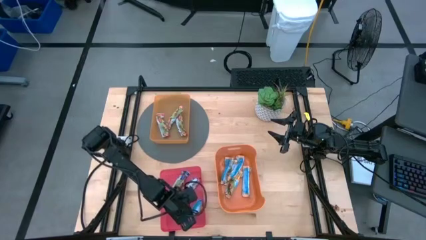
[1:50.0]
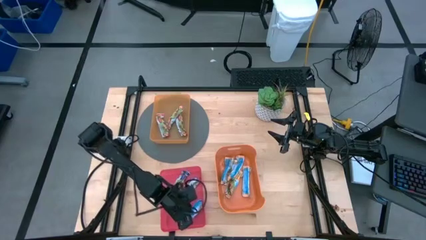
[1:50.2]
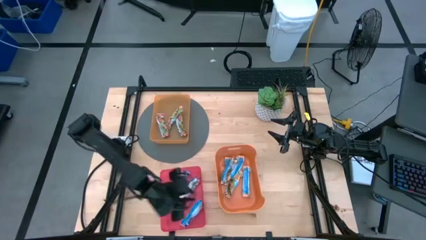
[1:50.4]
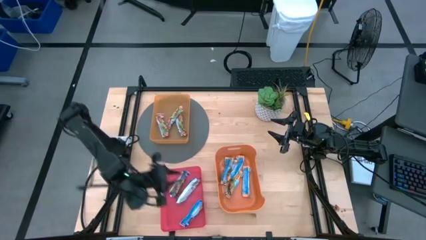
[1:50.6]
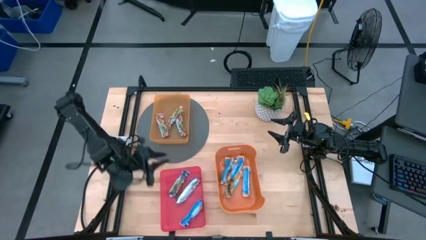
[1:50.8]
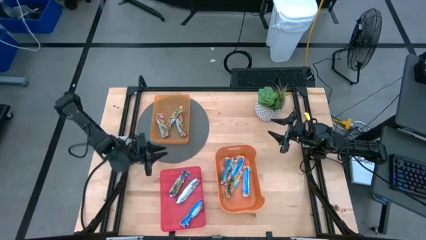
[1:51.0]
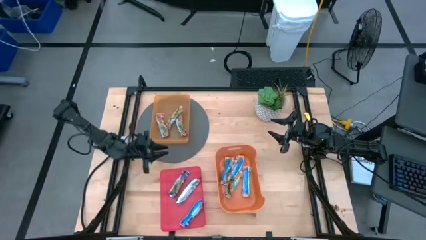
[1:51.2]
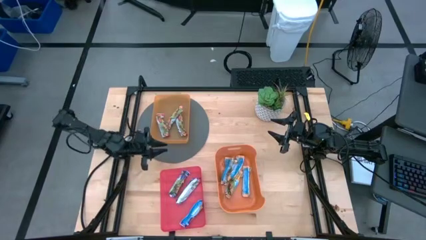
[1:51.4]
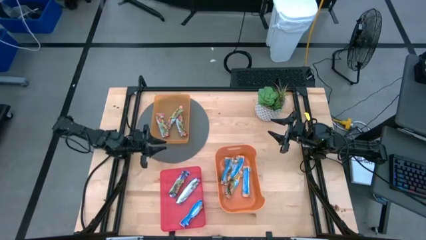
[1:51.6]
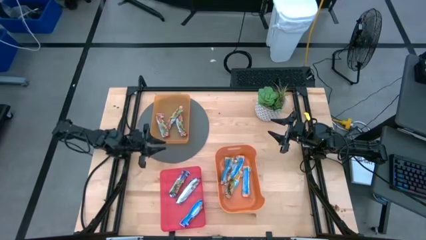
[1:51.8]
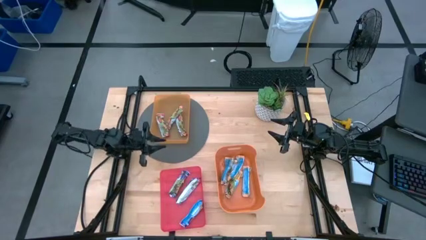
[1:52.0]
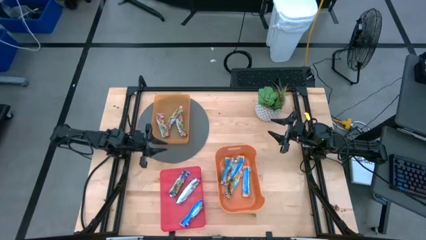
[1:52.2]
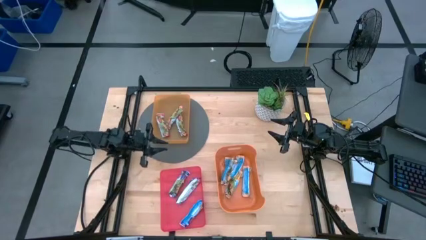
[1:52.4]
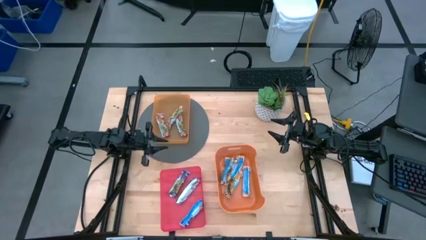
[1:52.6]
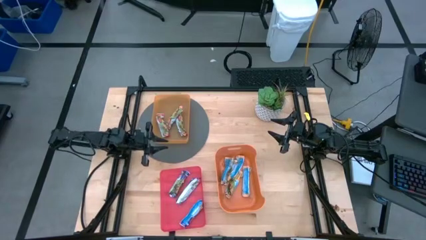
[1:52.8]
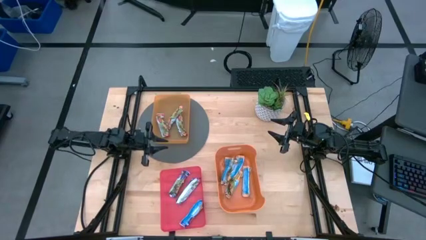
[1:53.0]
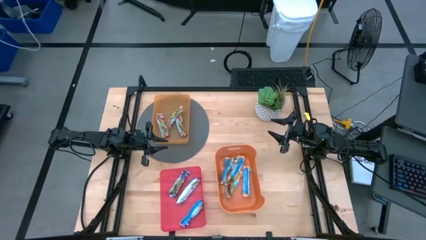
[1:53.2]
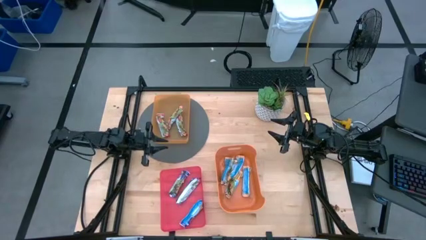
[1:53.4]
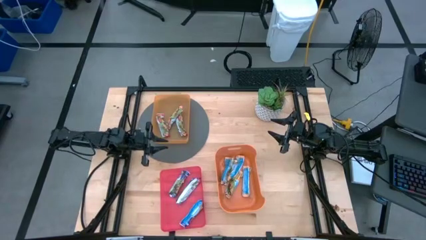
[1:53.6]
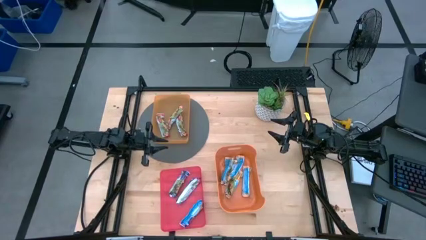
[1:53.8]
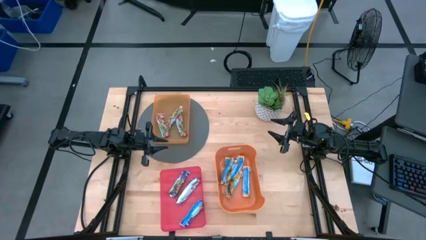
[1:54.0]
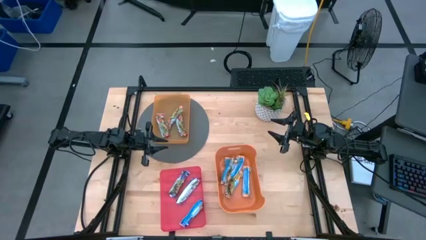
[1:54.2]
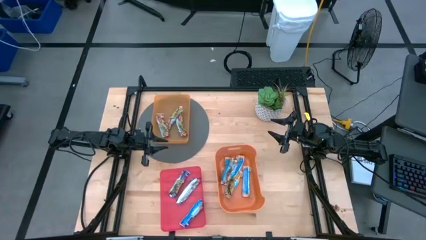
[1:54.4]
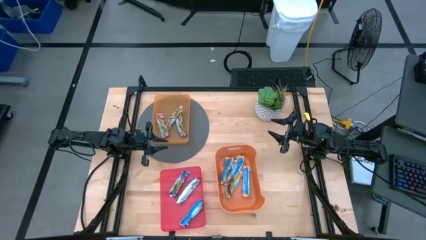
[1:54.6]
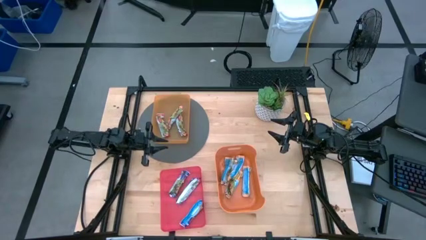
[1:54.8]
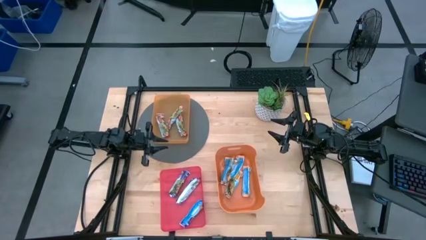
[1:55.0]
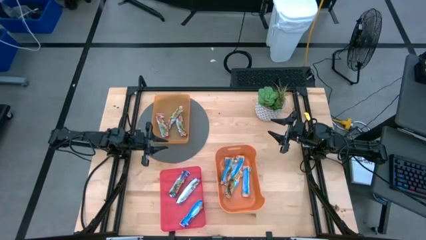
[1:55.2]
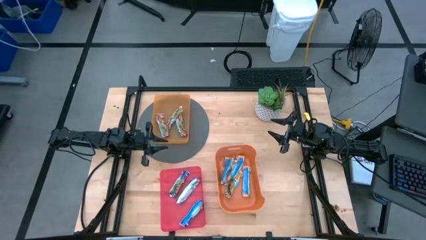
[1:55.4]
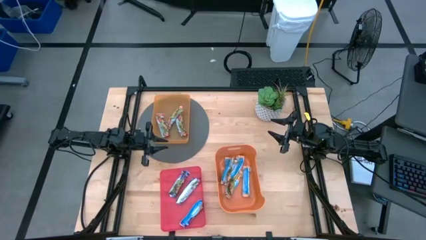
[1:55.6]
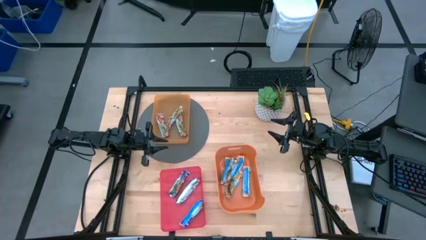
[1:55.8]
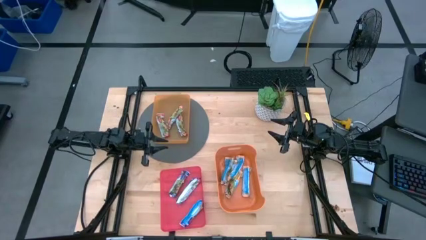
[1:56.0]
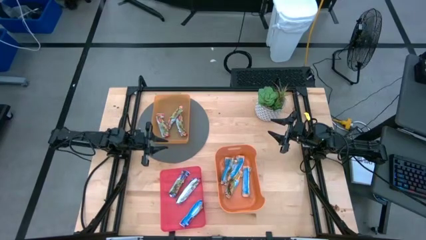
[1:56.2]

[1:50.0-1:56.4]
Task: Pick and place Granola Bars by type
Return to Home Position

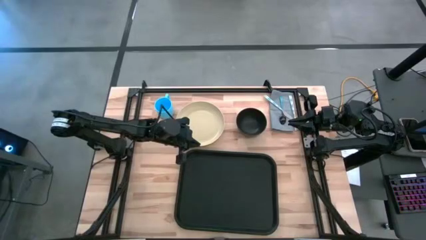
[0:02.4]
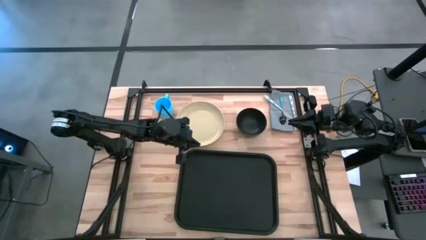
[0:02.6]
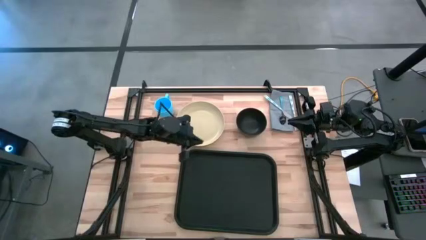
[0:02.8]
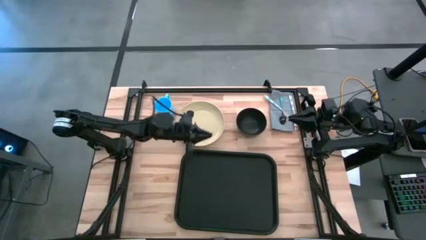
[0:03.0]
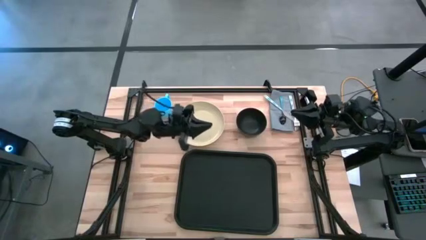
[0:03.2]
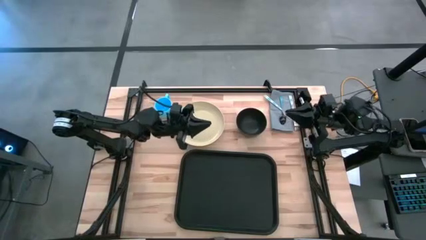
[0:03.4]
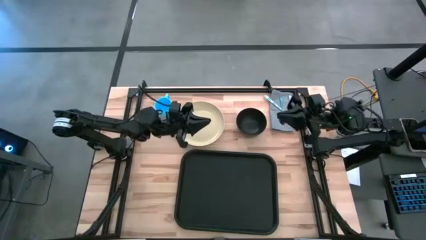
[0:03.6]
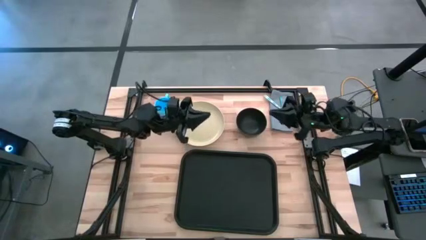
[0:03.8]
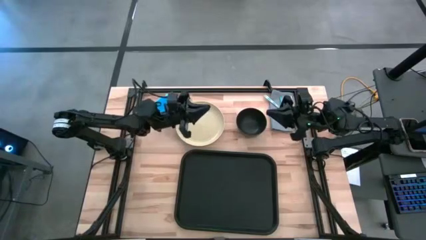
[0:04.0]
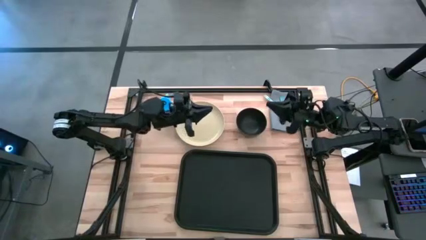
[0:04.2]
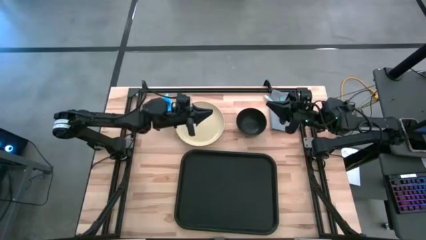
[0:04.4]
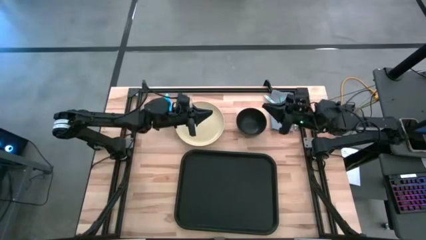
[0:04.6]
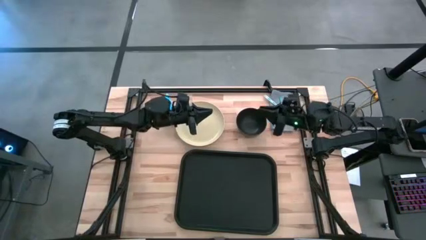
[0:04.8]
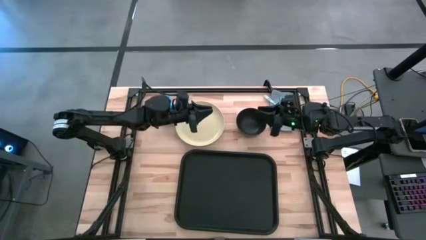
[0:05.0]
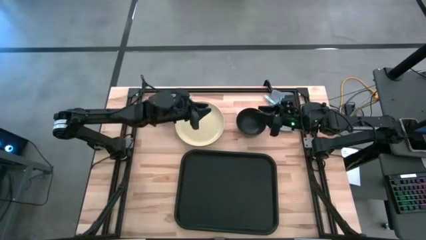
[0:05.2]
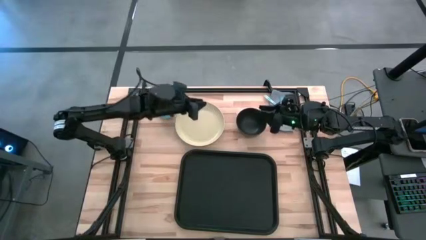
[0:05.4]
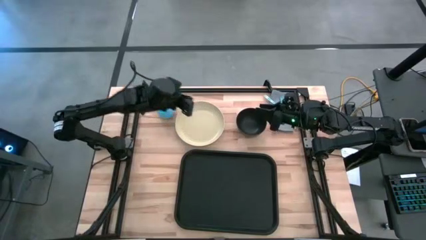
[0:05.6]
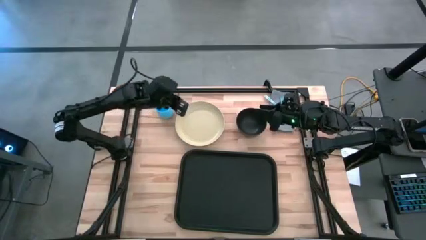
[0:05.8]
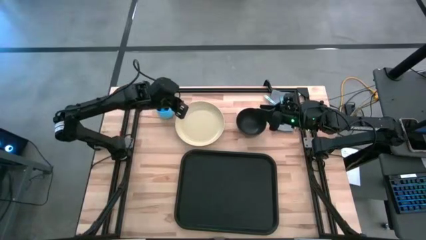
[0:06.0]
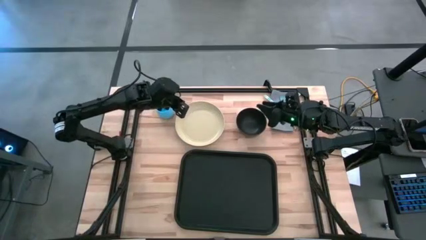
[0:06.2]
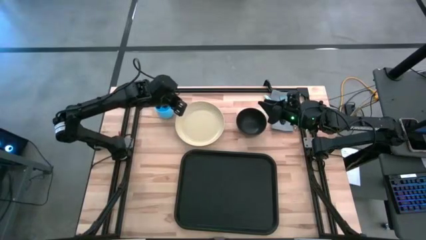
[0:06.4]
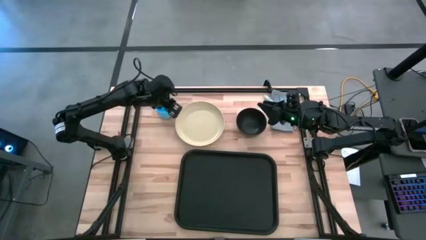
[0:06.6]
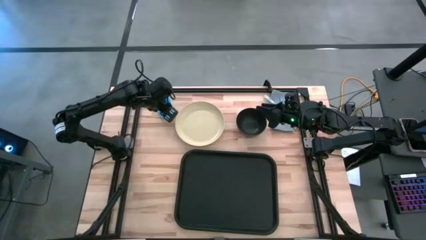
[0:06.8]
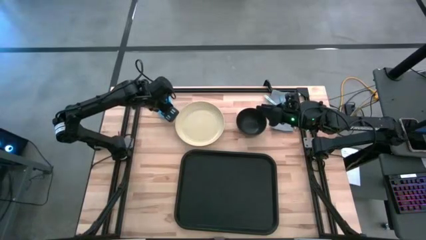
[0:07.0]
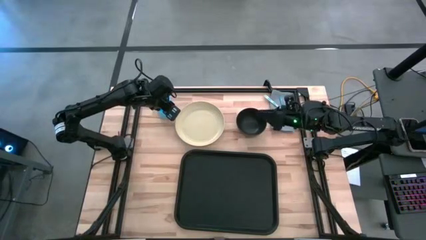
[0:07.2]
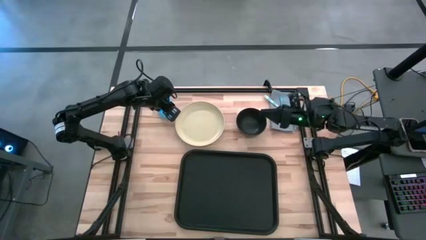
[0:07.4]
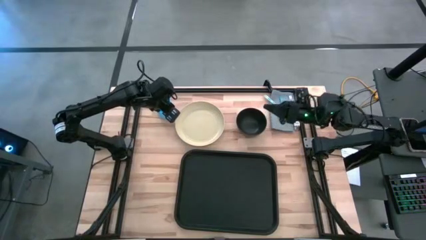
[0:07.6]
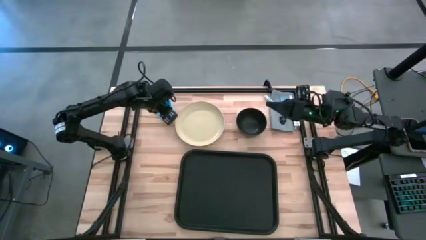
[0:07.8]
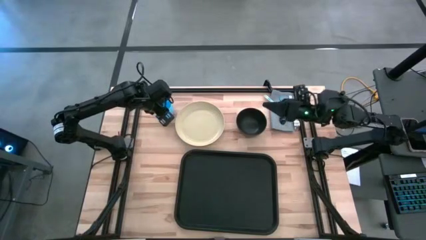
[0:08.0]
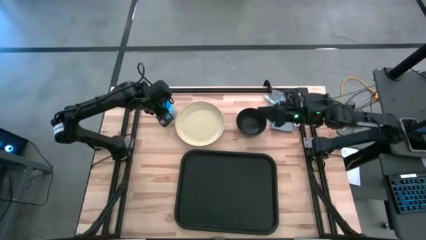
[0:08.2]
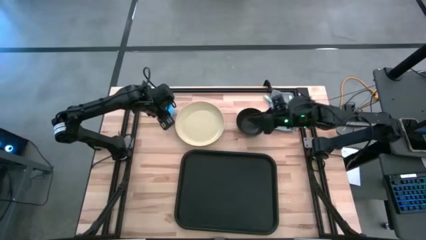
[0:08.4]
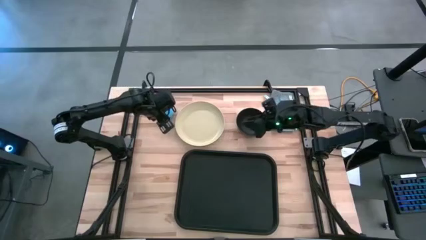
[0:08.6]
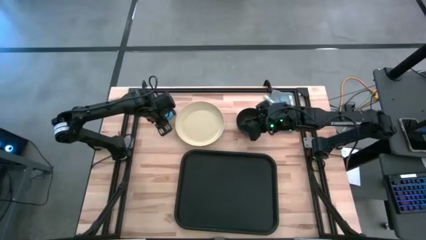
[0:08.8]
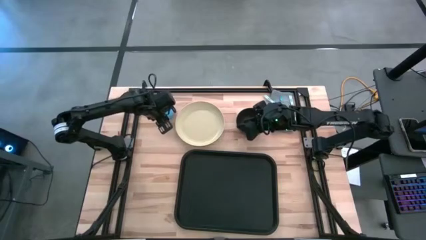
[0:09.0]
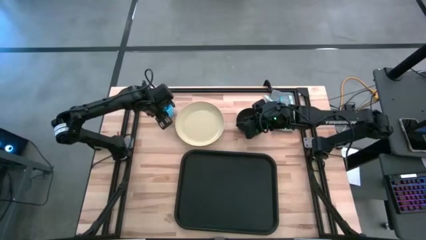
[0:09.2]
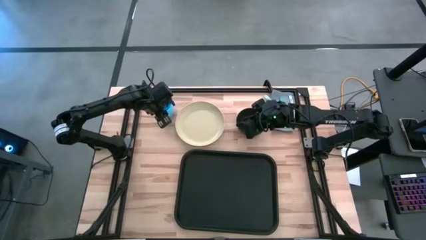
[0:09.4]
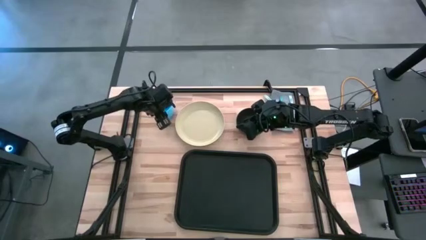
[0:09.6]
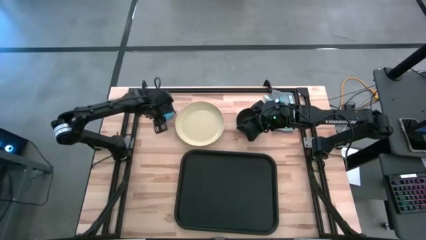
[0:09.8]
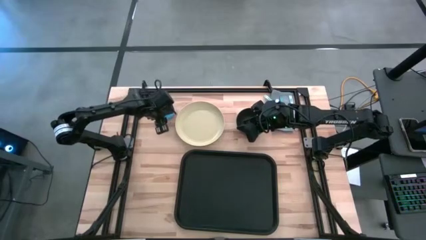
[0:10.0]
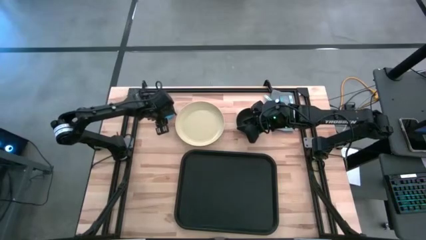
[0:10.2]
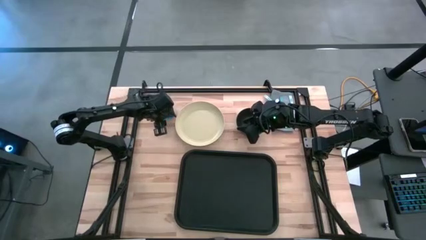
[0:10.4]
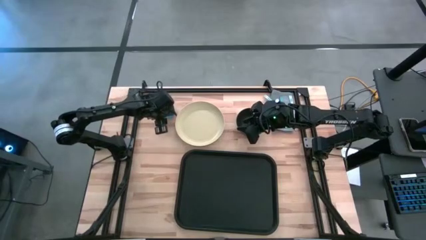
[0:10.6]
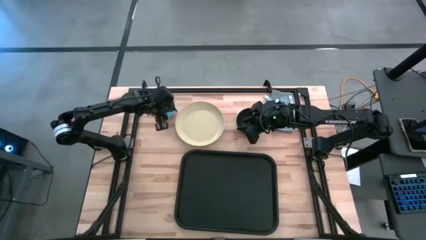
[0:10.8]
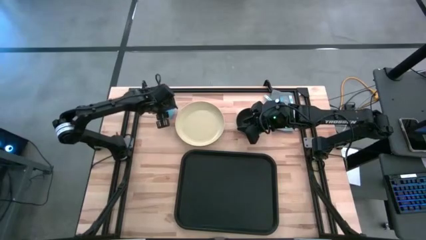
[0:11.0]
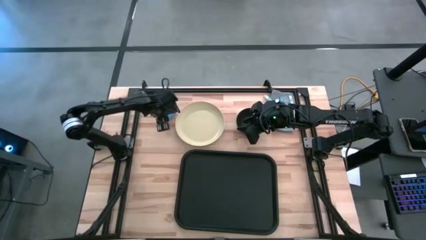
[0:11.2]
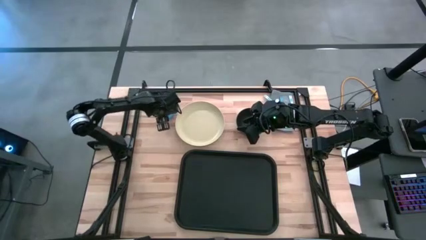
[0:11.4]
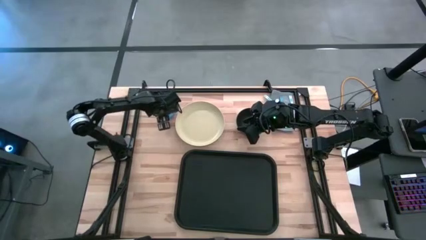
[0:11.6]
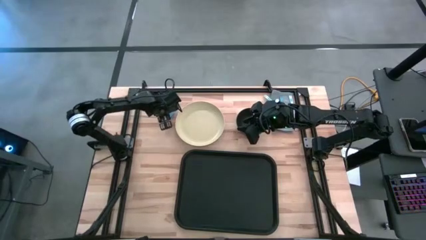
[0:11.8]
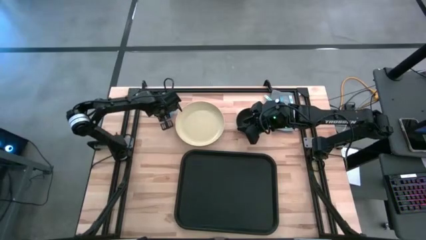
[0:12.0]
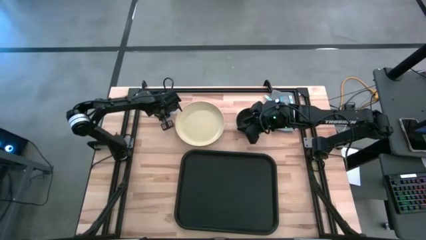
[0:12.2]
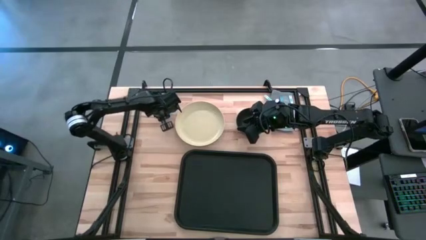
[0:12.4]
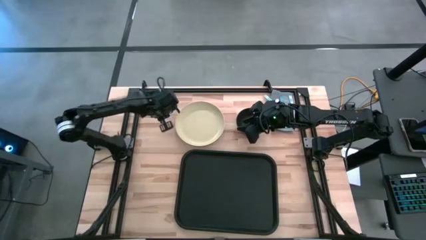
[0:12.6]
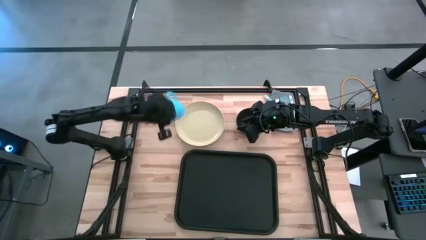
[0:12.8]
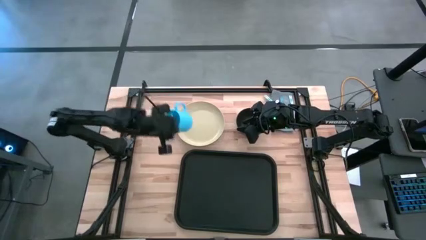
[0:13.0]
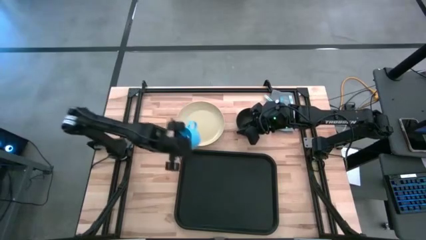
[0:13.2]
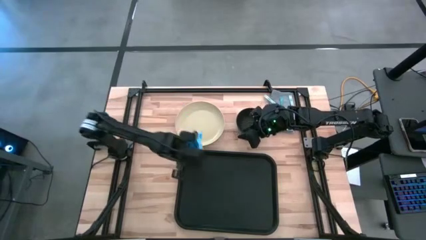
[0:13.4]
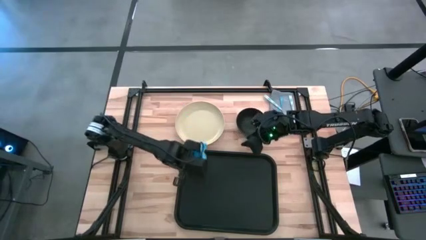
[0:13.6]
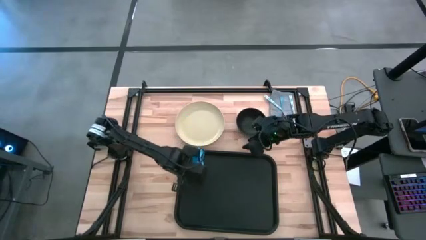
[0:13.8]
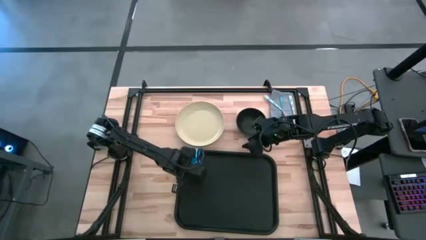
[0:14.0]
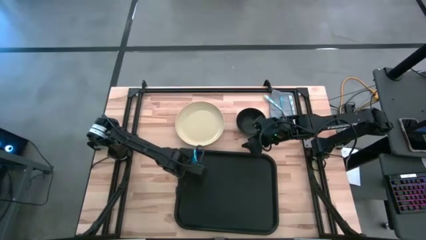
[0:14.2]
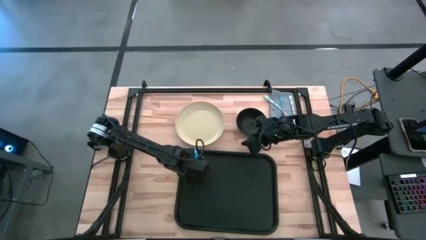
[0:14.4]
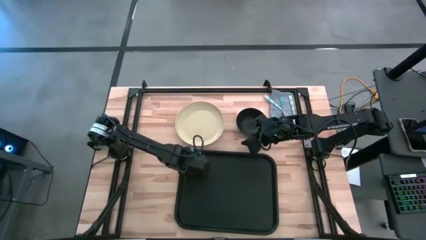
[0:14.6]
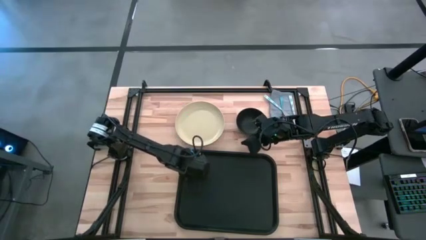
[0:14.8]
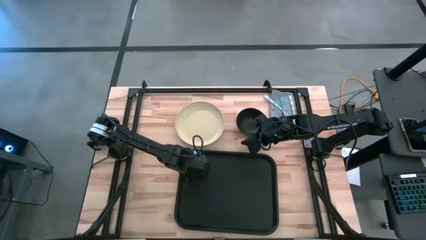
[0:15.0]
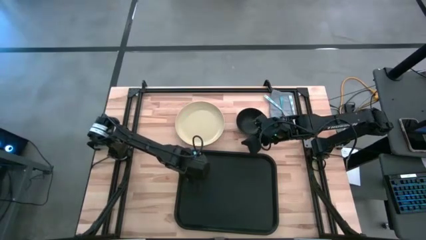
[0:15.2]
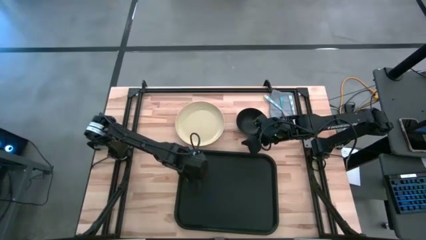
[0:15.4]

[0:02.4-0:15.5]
Task: Set up tray
Put the blue mug on the black serving tray
